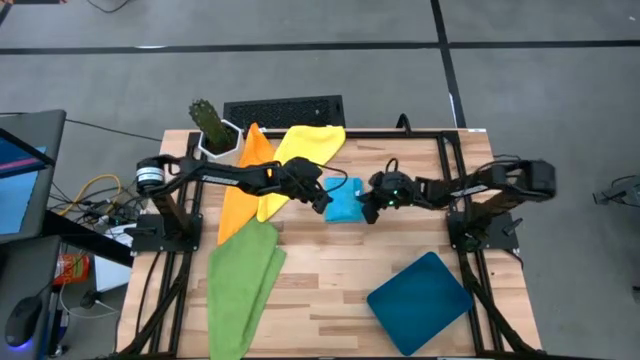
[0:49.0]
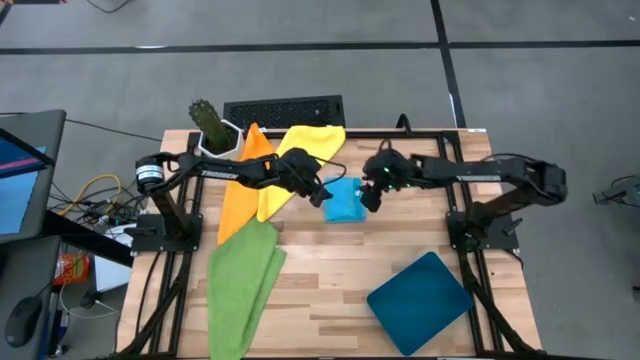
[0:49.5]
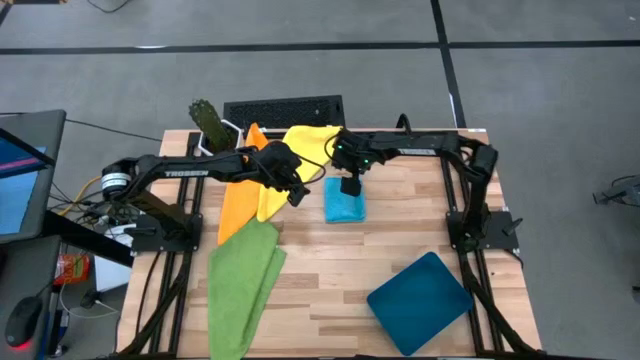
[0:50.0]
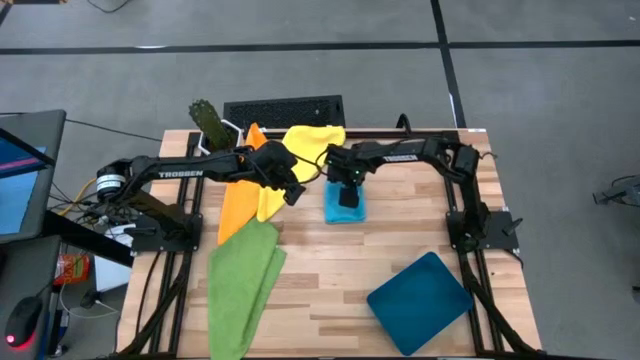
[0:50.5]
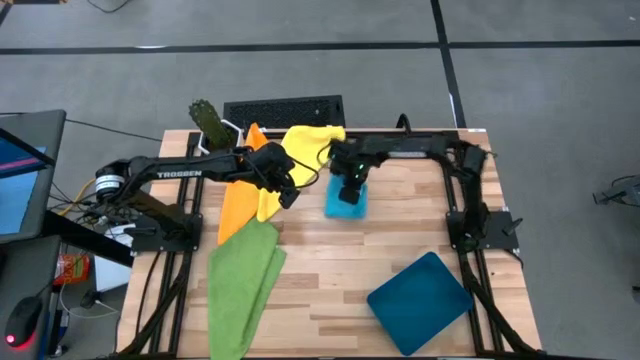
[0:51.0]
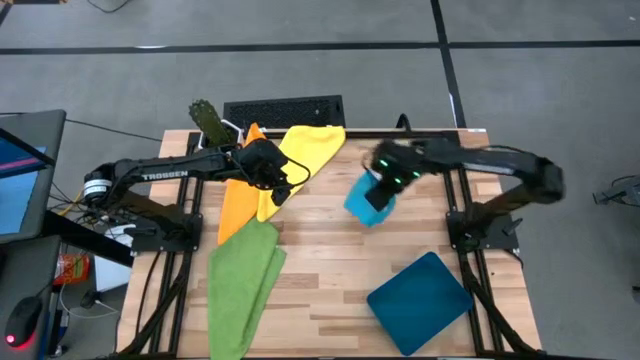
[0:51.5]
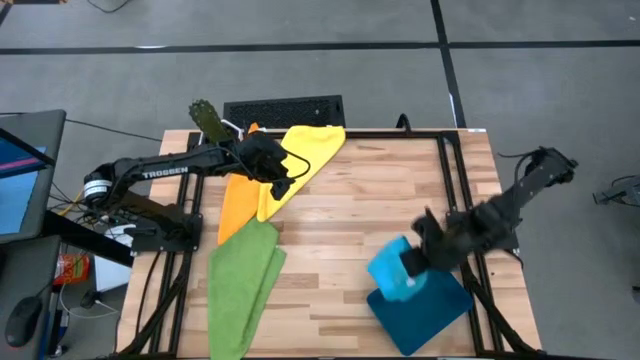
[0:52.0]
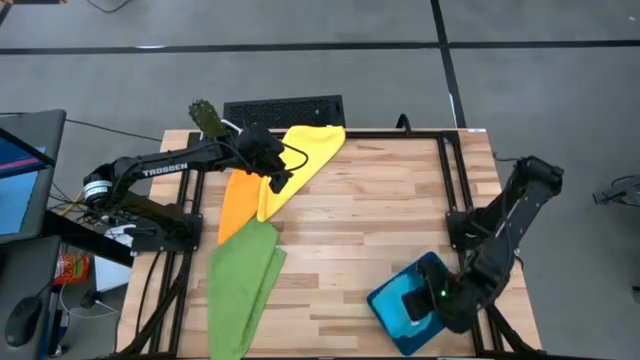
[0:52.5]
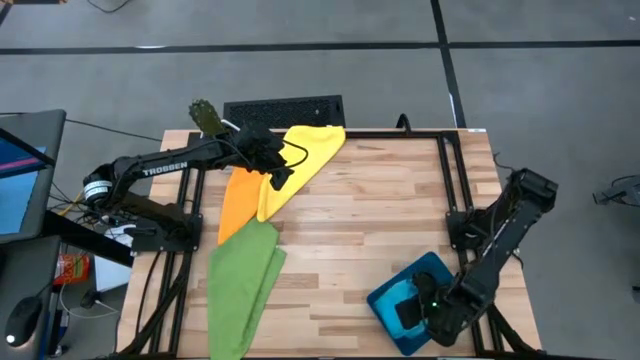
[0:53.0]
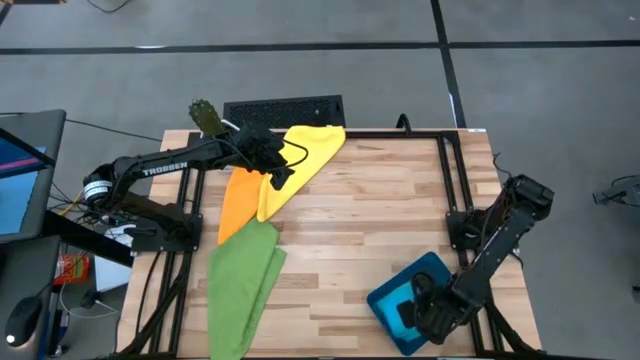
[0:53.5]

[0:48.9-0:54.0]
Task: Fold microfiber towels
Put the folded blue microfiber towel into the blue bin

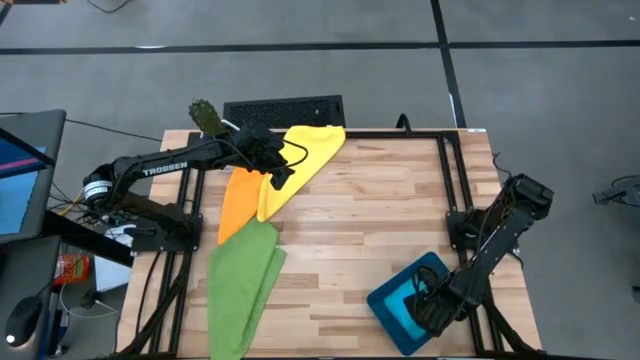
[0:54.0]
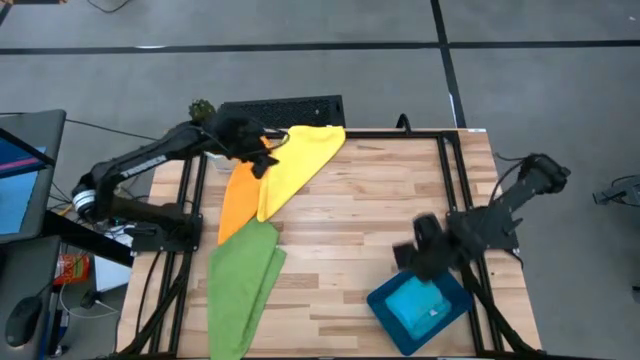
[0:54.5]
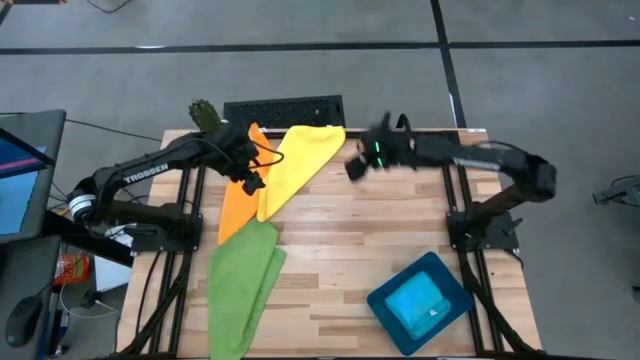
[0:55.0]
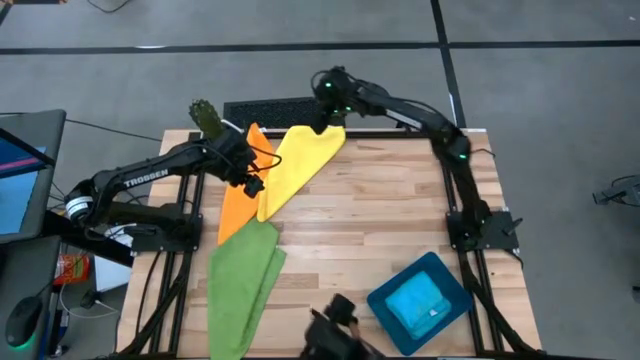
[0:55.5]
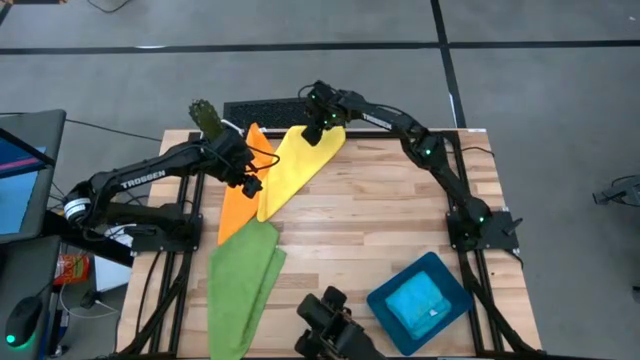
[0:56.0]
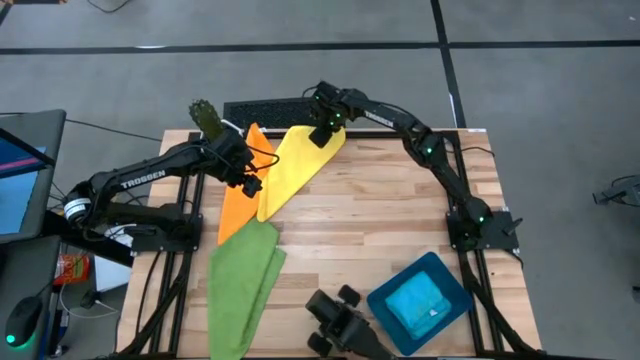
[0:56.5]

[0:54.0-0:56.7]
Fold the yellow microfiber towel

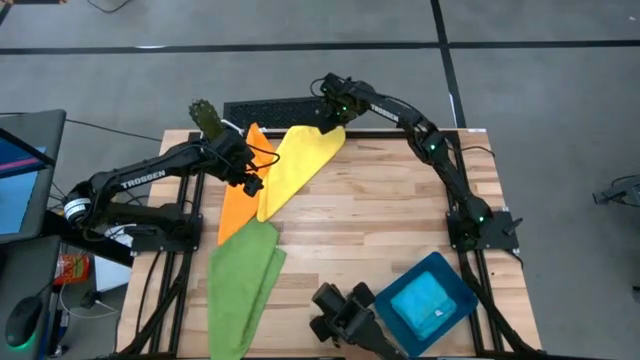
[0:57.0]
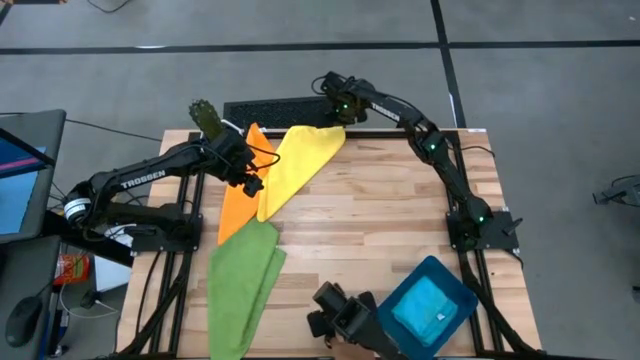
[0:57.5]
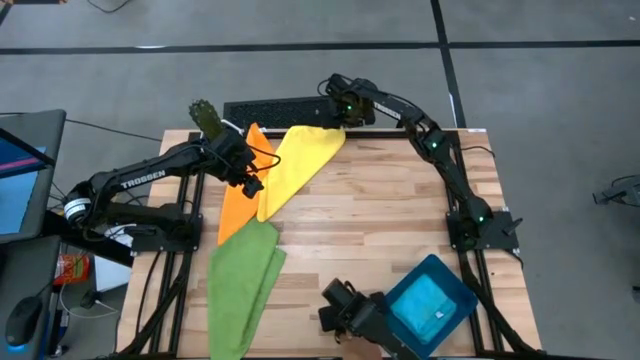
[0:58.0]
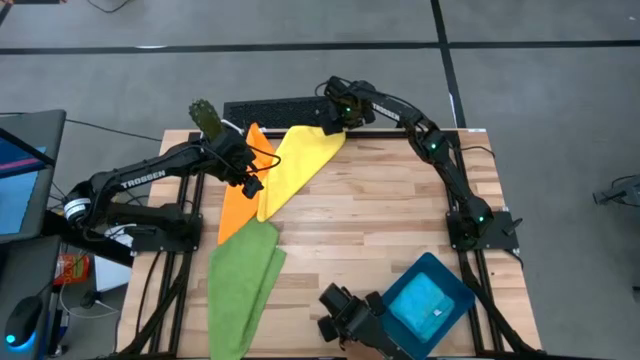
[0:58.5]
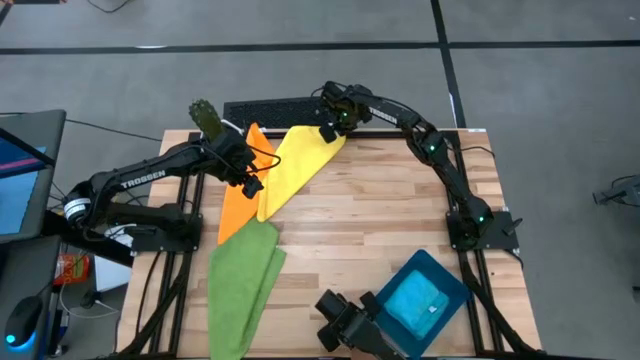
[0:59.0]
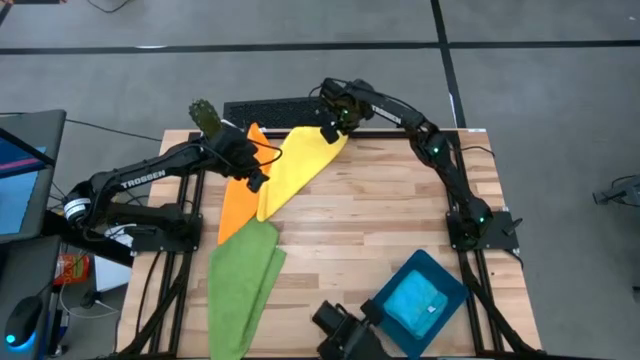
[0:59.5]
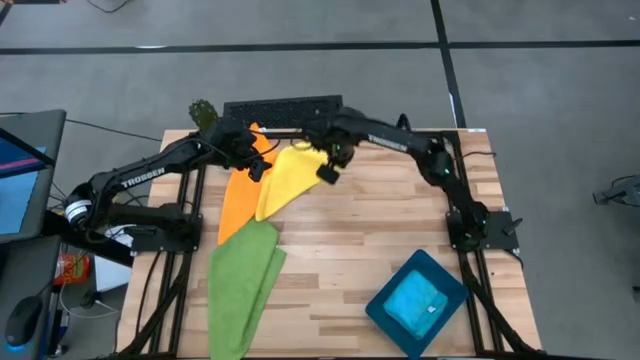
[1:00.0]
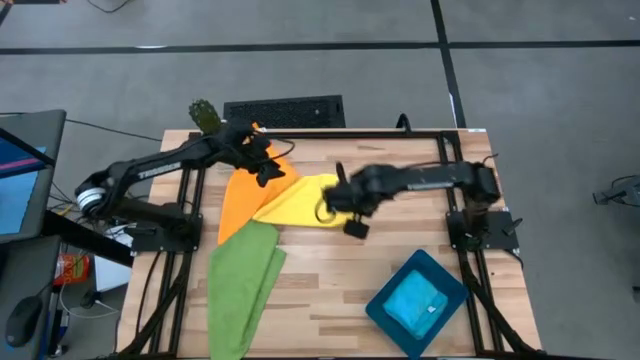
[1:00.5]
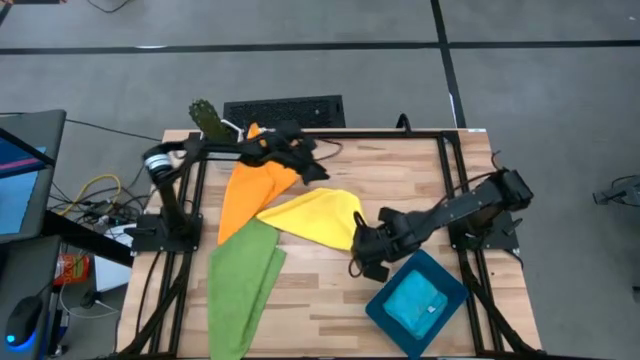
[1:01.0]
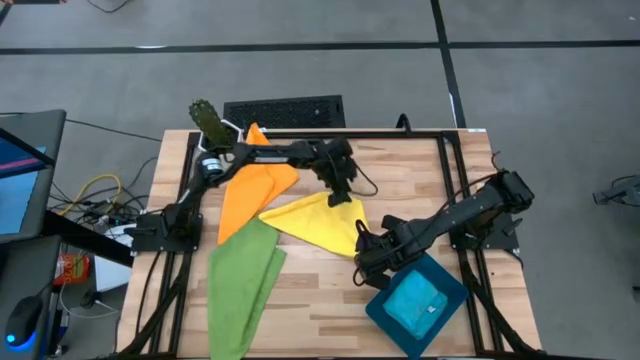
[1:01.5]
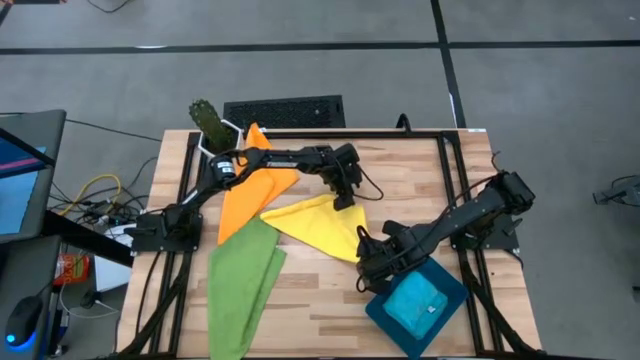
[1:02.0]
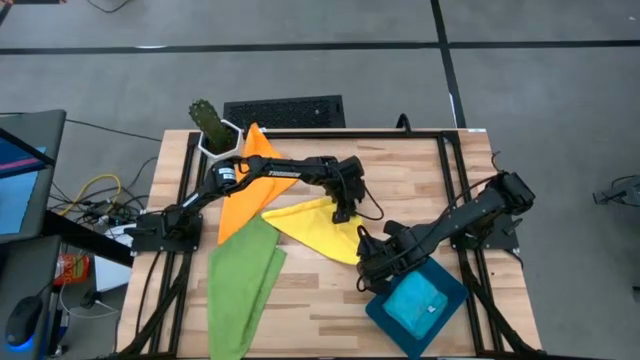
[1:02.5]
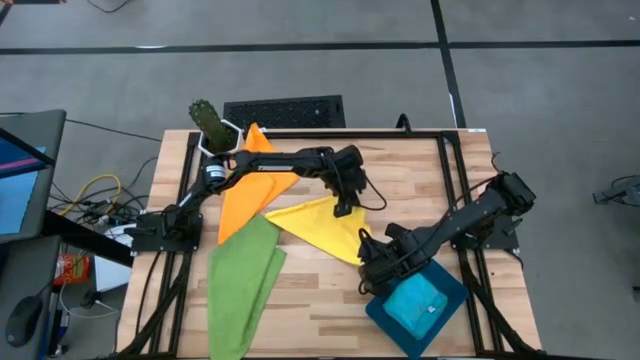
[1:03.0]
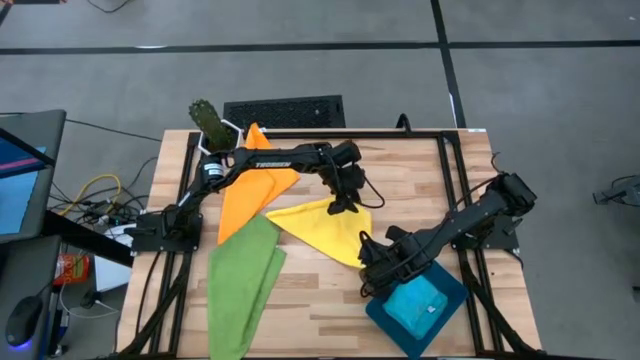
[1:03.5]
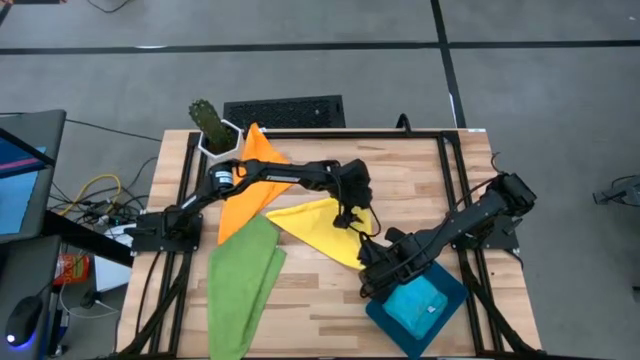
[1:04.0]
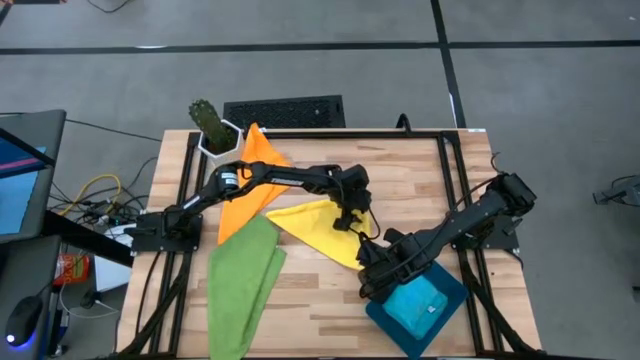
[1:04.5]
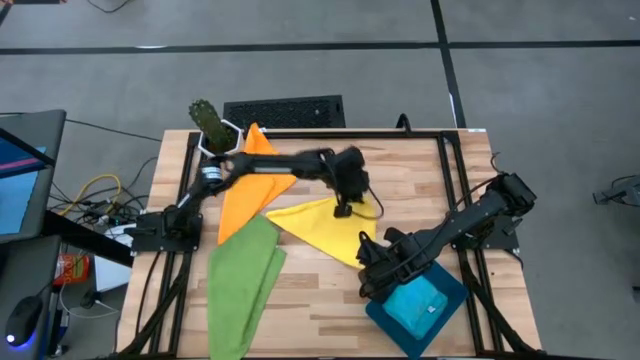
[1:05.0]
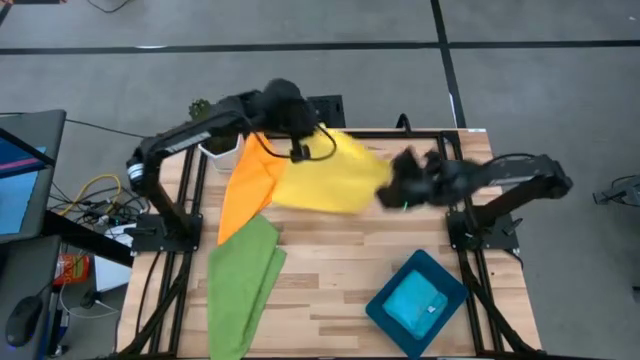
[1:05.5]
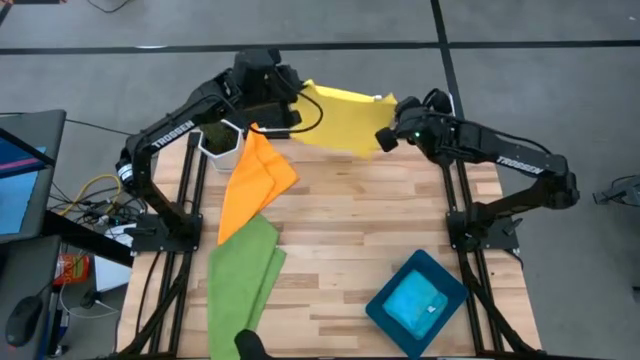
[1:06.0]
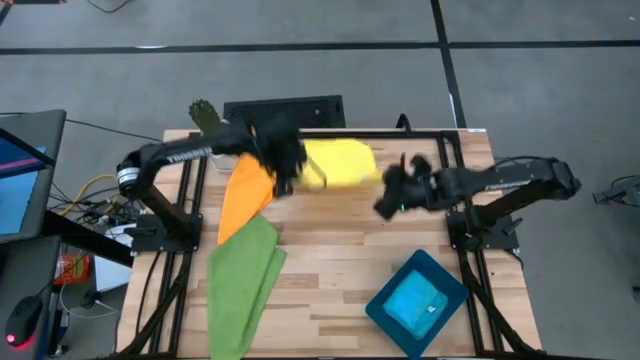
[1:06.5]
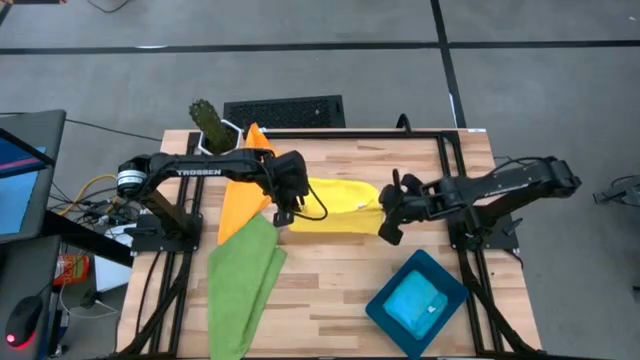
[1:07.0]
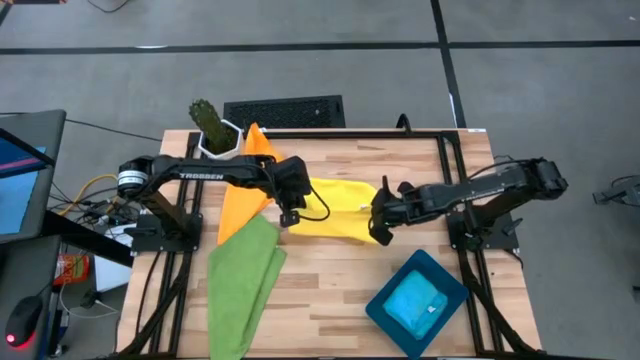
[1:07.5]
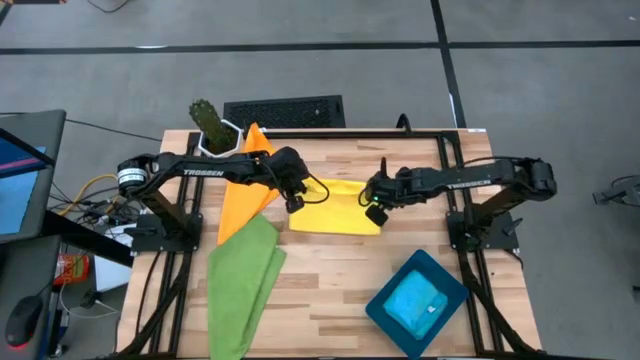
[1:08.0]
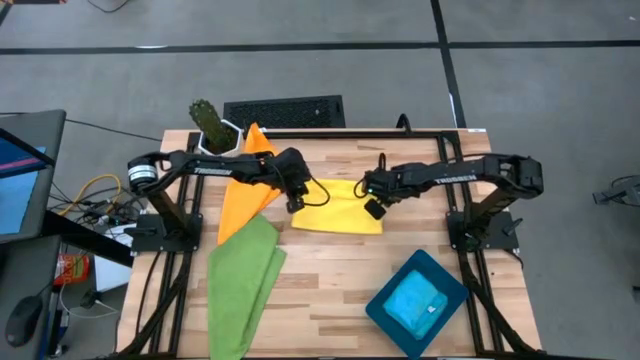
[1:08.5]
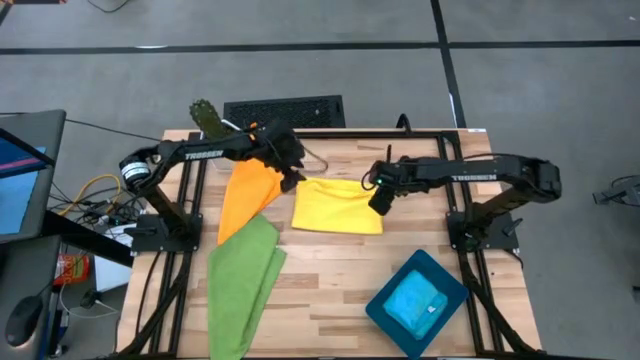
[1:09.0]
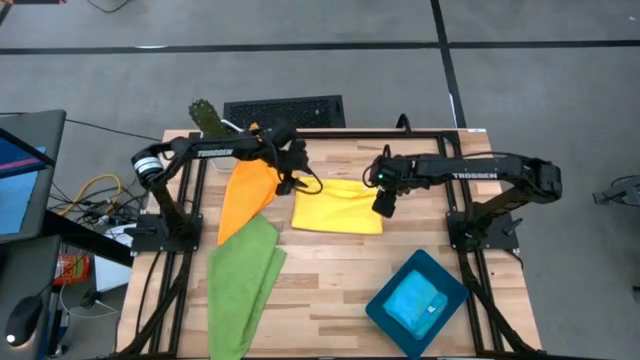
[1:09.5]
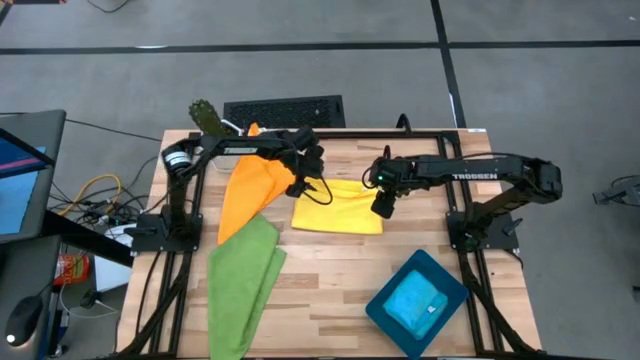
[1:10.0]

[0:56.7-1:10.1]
Fold the yellow microfiber towel
